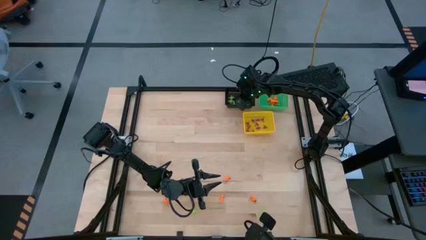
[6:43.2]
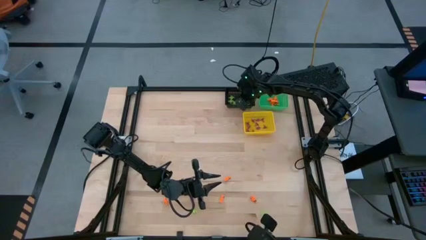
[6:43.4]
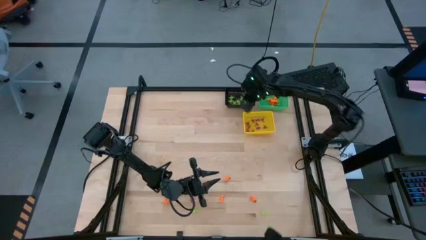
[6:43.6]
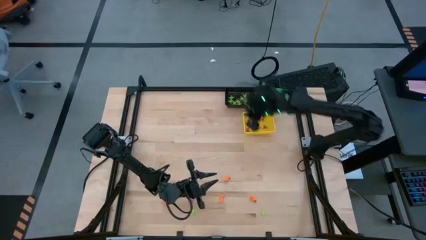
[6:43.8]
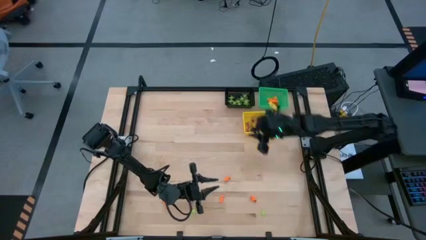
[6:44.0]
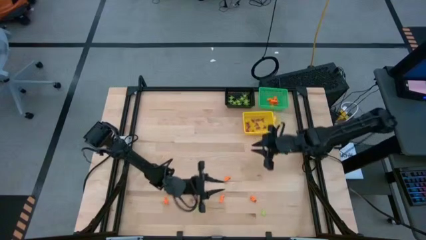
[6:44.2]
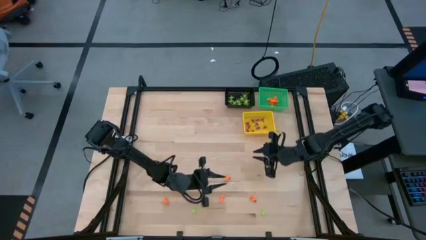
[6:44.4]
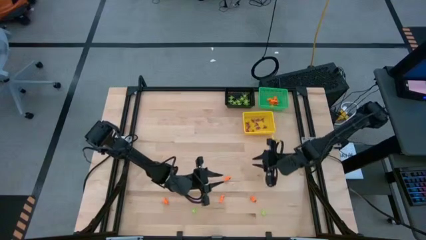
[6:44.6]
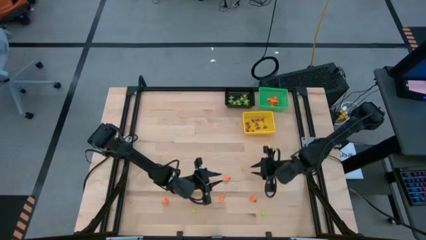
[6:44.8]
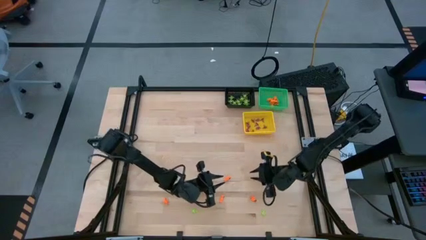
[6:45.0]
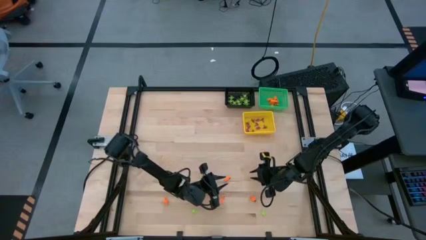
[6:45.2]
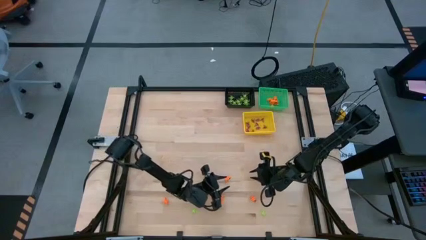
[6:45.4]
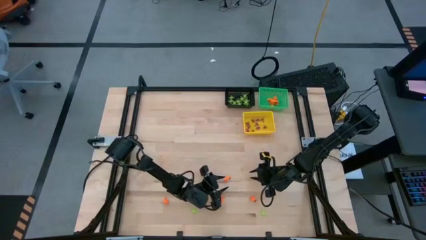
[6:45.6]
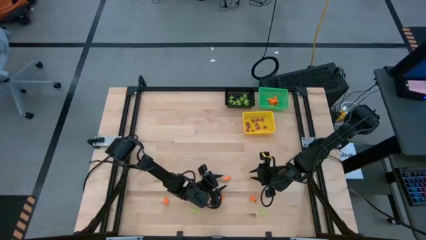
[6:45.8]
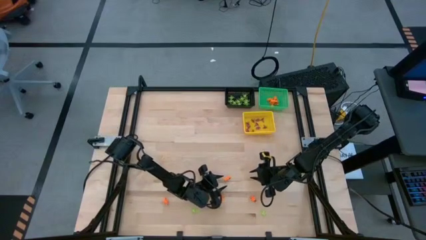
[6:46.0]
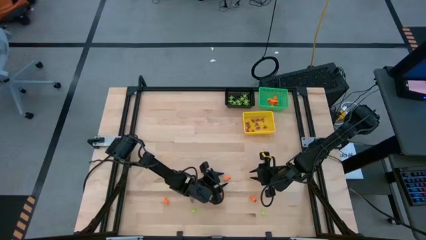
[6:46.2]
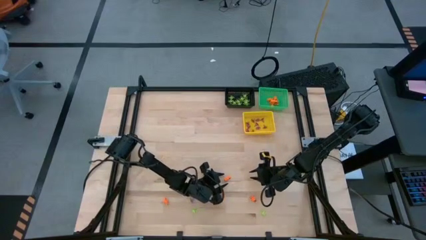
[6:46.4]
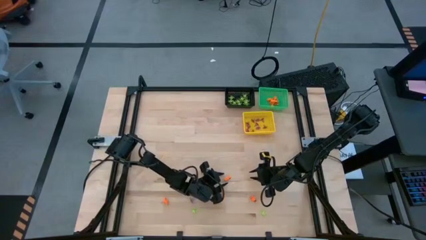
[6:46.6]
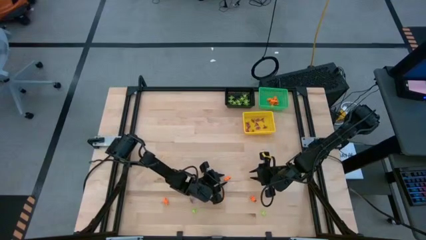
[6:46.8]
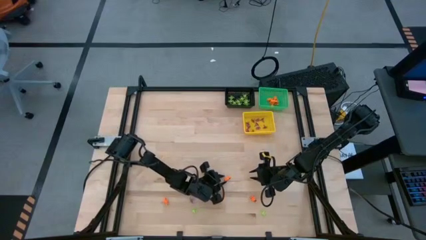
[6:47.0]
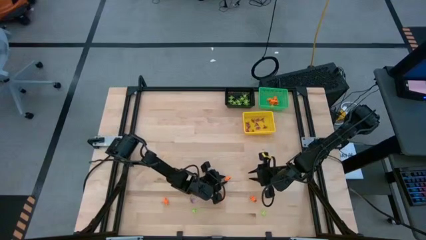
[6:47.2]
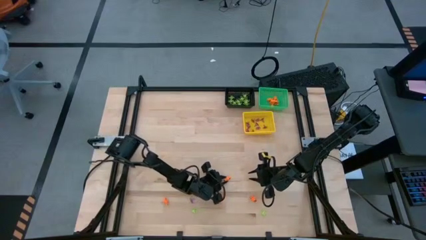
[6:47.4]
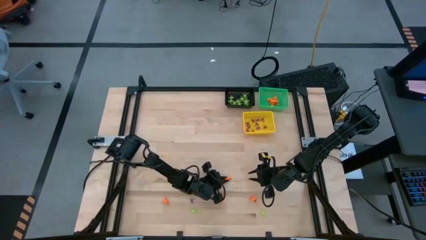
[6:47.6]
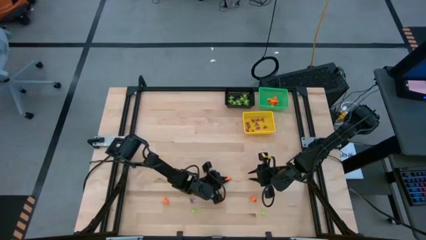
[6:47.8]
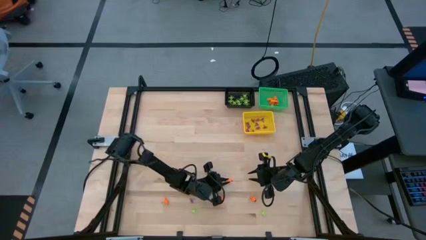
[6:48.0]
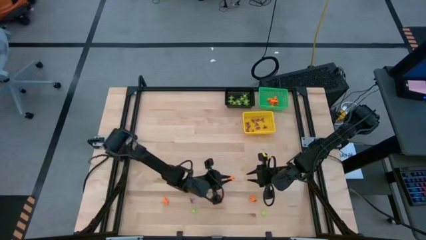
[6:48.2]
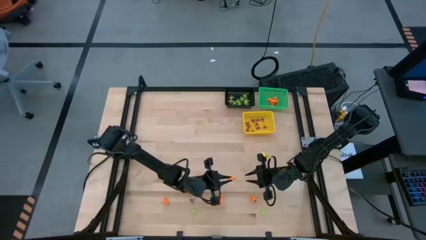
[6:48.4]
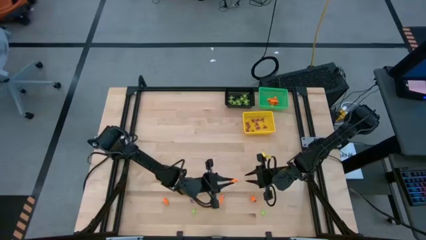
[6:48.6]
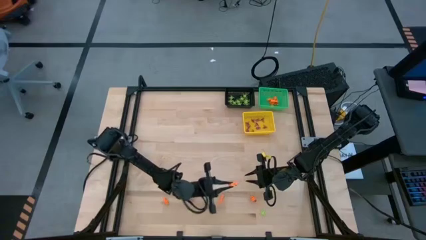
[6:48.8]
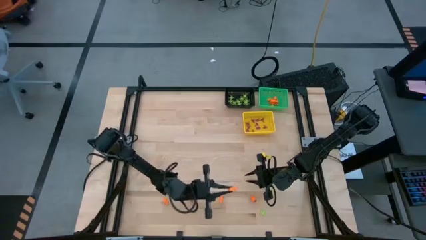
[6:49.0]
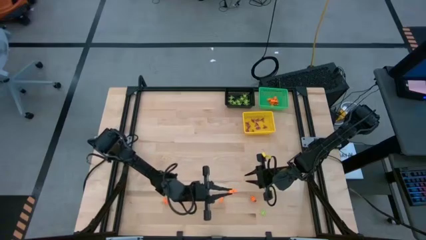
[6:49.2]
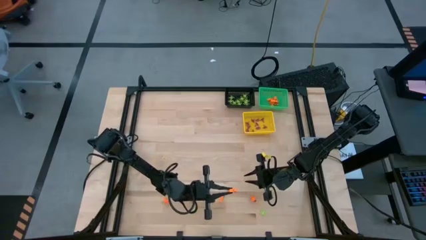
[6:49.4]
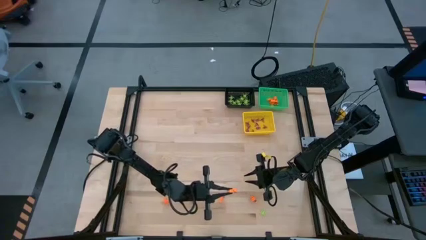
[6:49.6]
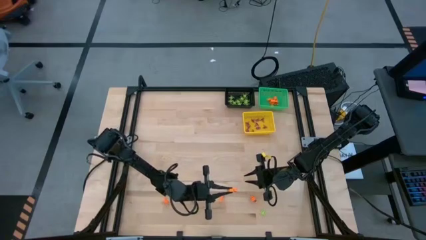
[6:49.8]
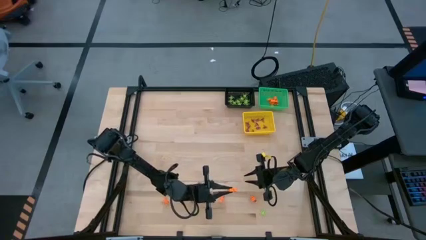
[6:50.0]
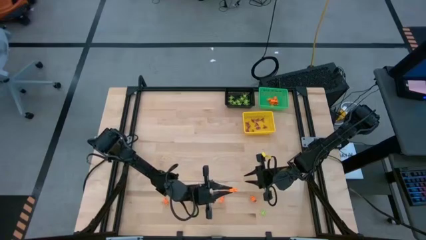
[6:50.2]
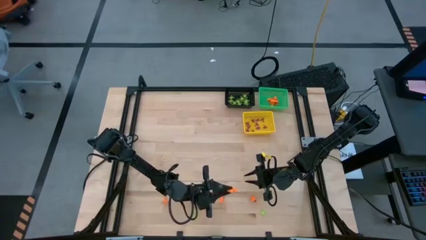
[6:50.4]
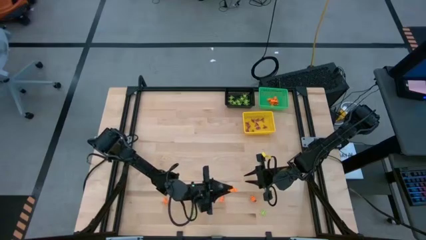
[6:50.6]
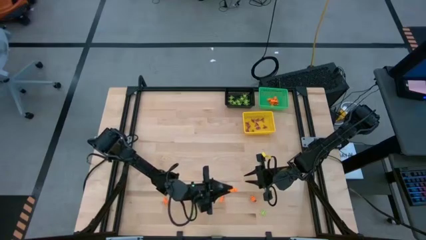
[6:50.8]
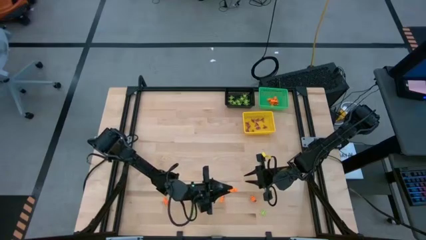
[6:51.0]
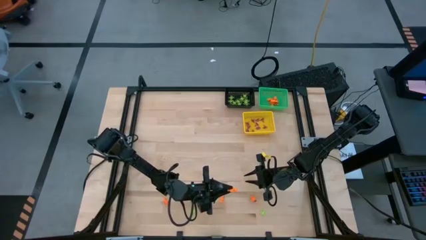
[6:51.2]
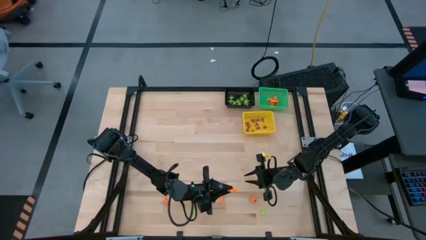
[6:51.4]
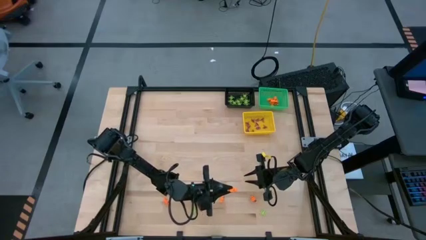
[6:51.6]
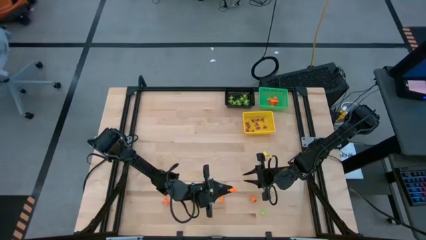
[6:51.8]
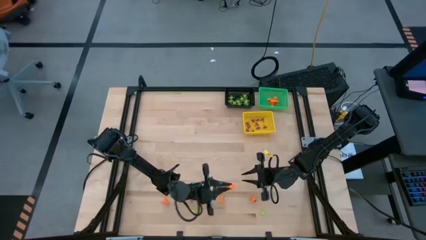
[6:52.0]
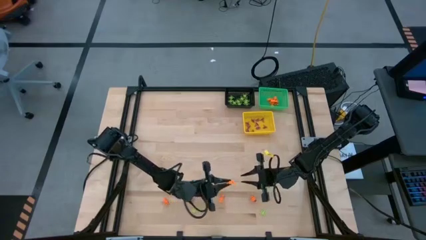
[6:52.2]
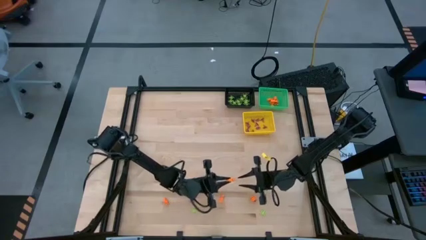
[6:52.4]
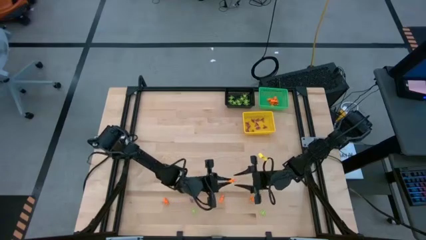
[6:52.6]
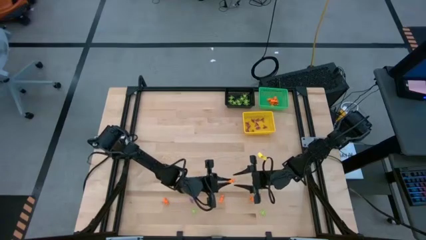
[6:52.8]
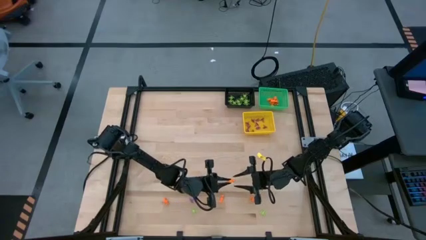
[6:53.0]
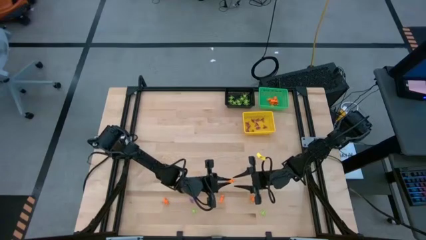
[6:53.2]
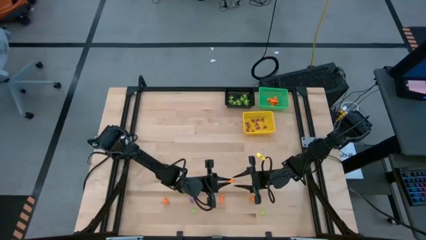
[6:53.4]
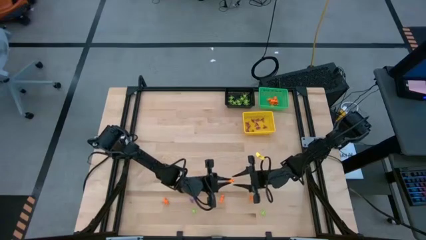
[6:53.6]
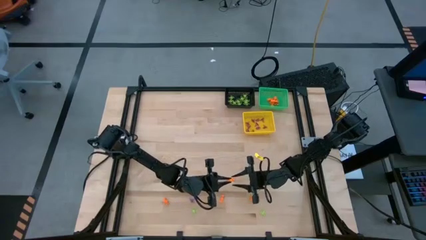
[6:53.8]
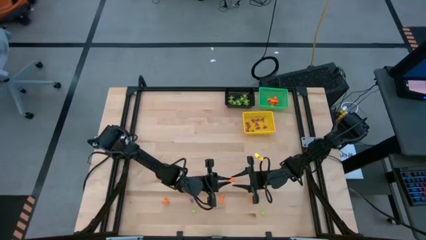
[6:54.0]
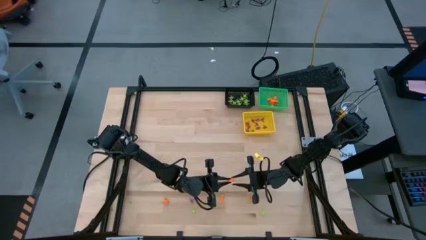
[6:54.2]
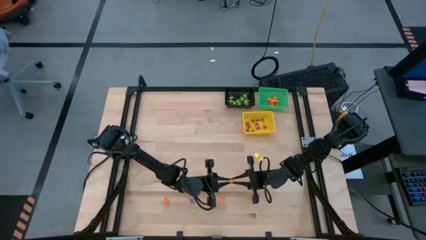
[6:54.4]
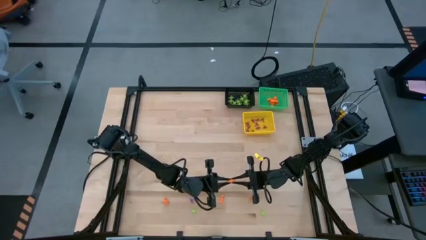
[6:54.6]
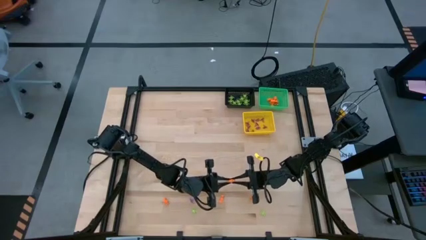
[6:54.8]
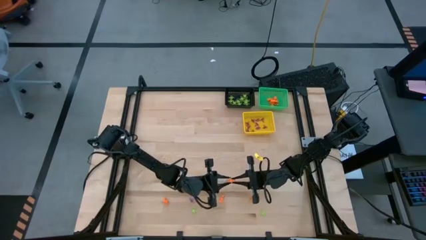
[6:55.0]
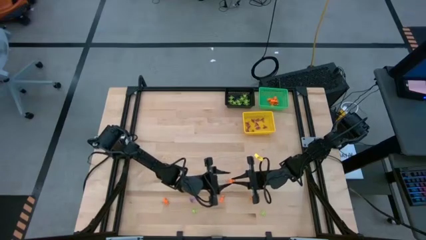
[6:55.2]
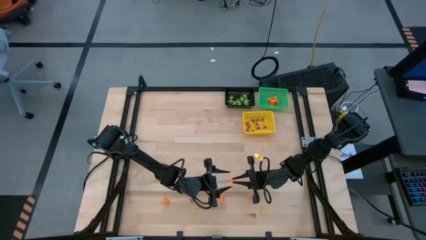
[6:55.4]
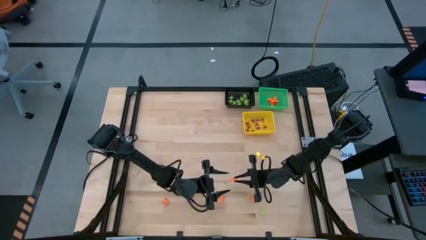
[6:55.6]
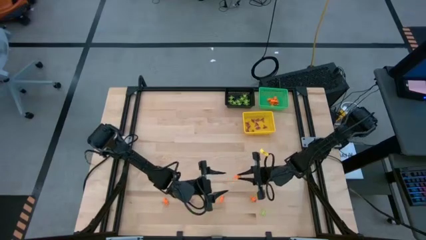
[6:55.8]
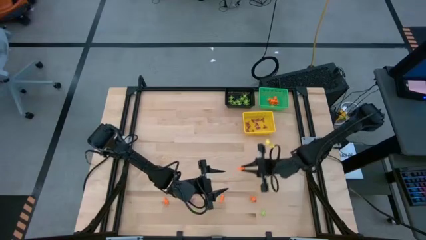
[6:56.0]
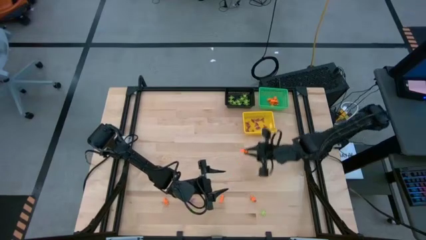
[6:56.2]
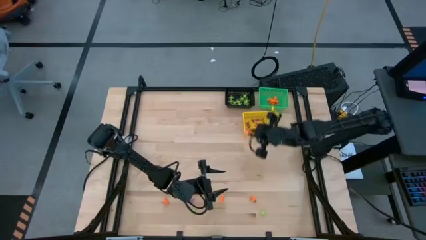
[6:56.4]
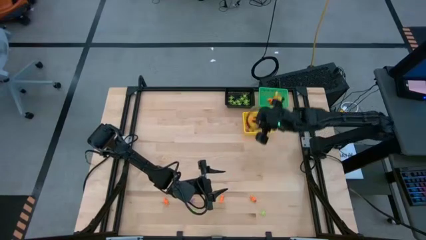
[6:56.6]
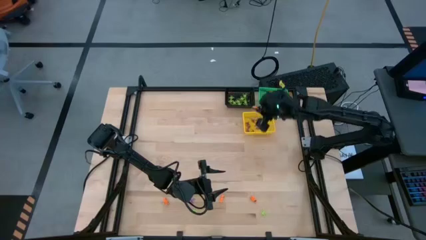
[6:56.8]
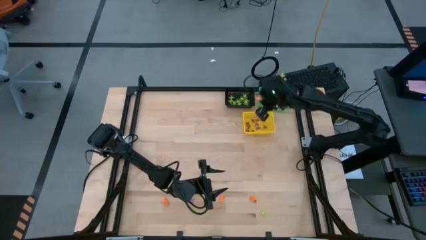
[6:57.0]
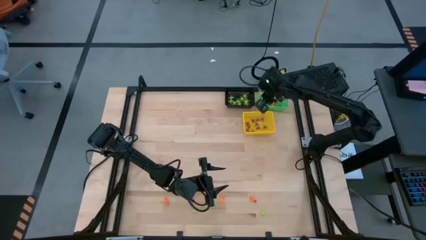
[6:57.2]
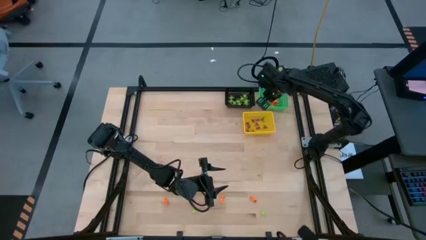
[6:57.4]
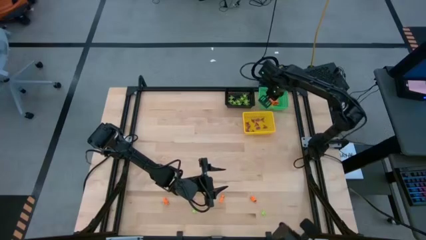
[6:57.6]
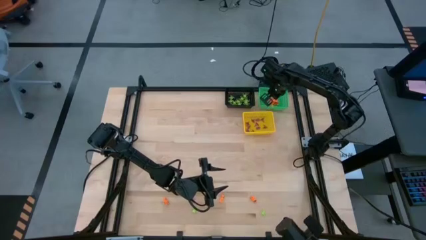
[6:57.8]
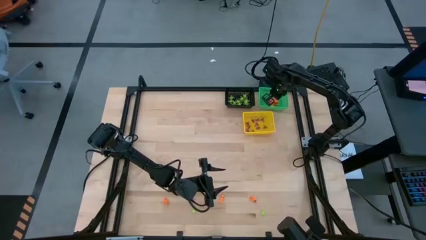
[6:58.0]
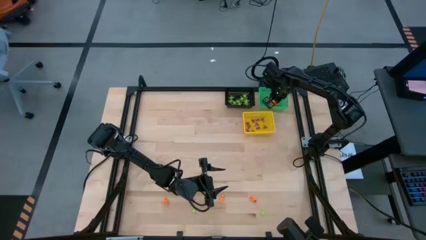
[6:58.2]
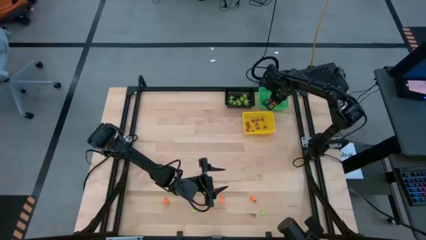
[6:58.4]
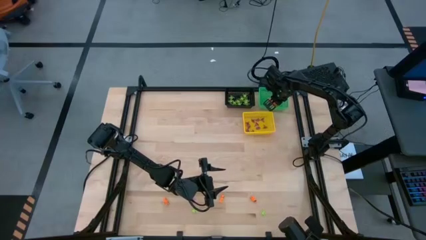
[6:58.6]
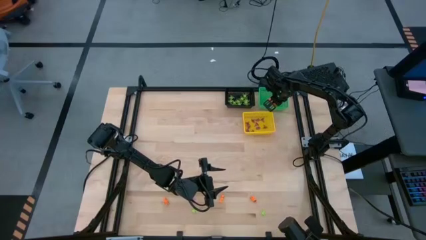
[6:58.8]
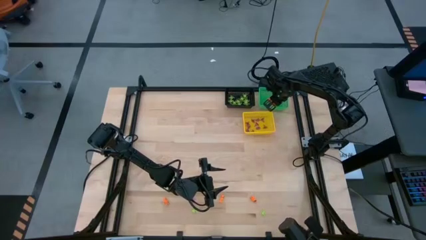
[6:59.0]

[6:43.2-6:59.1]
Task: Sort Halloween decoration
Put the orange skeleton toy into the green basket

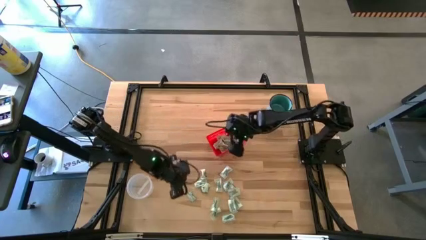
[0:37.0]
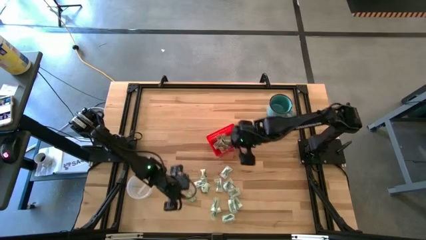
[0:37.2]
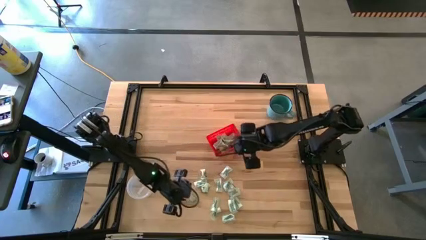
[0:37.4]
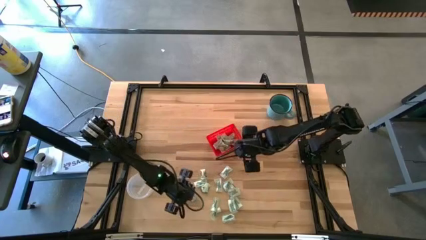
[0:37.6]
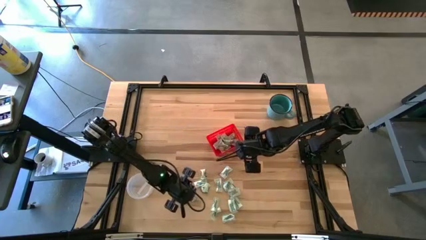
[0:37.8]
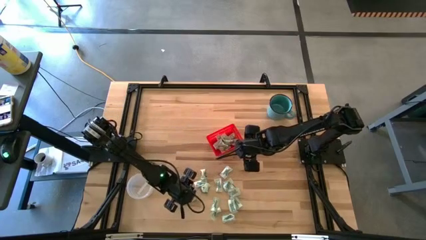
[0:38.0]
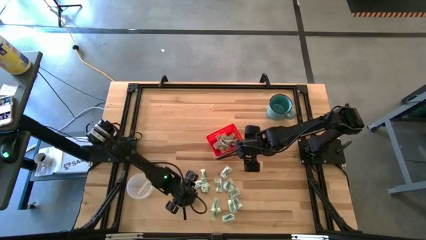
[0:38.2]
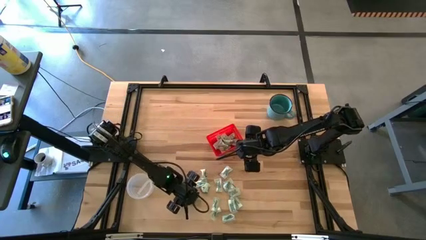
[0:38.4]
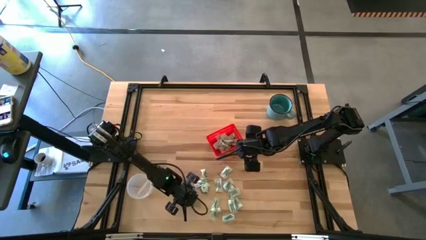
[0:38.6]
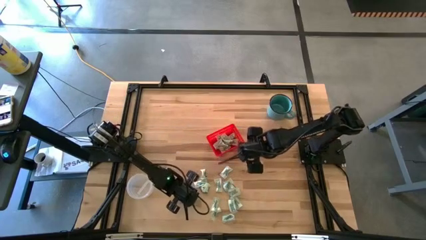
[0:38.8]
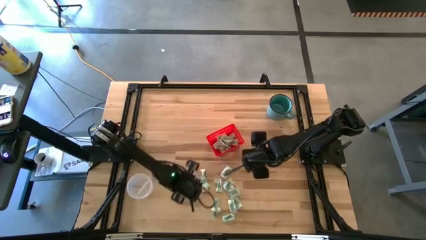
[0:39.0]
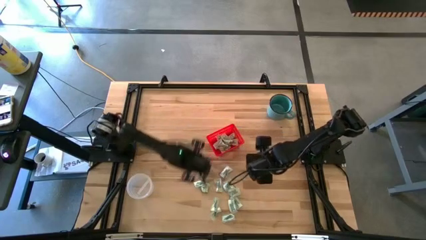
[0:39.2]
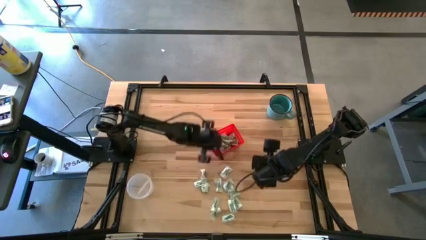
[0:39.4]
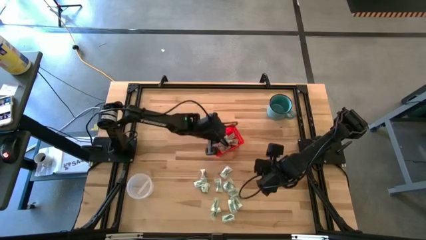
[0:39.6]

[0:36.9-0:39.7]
Task: Pick and place items into bin
Put the stevia packet into the red bin
